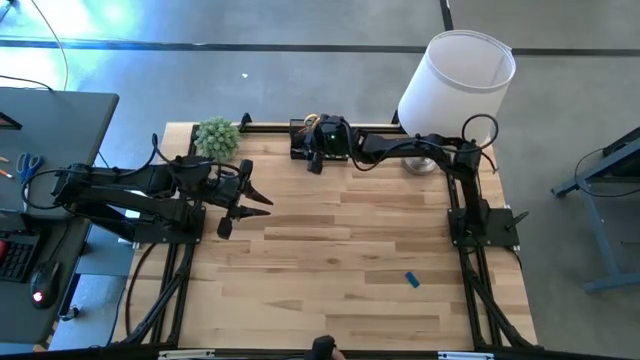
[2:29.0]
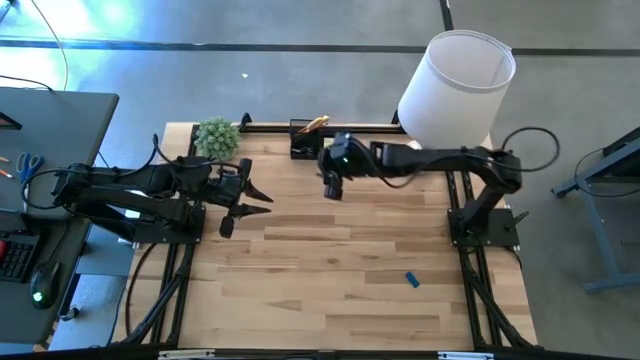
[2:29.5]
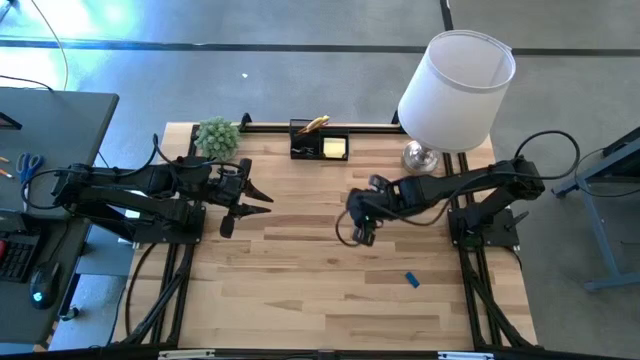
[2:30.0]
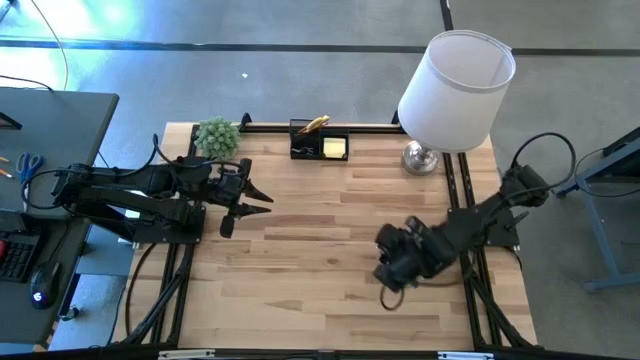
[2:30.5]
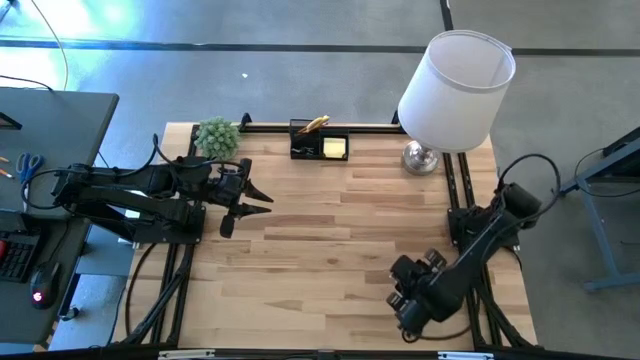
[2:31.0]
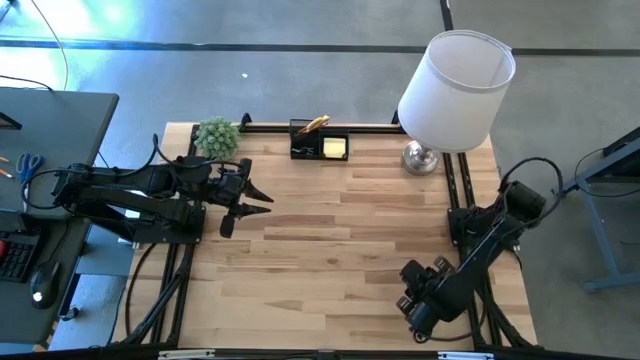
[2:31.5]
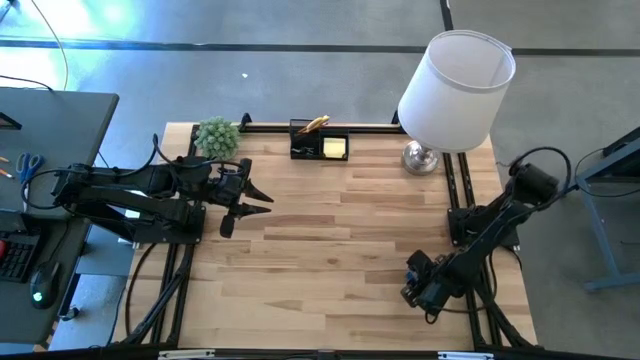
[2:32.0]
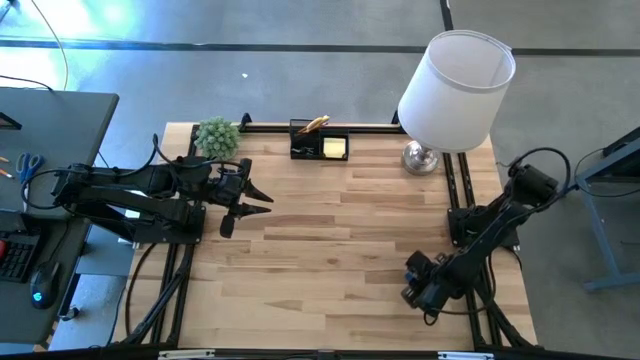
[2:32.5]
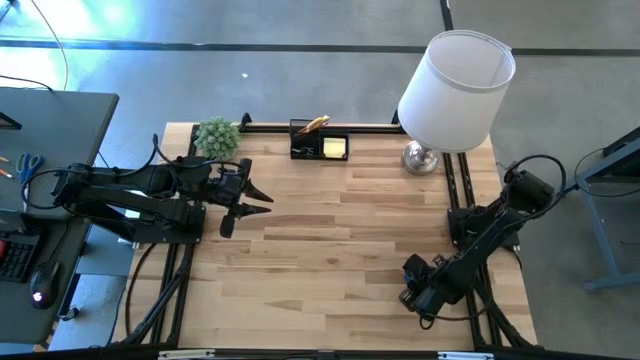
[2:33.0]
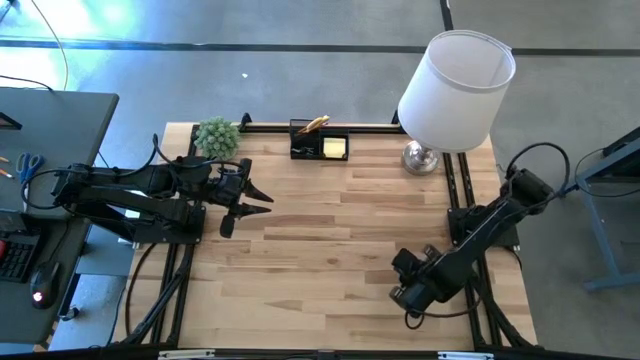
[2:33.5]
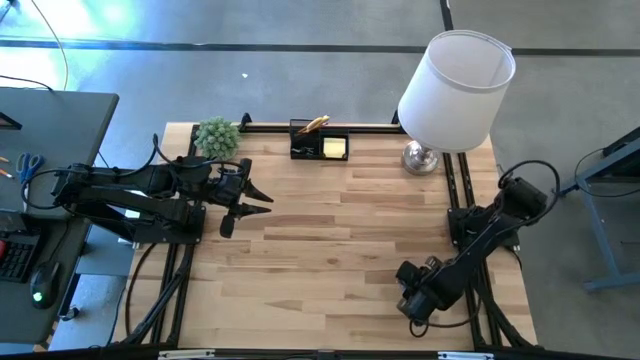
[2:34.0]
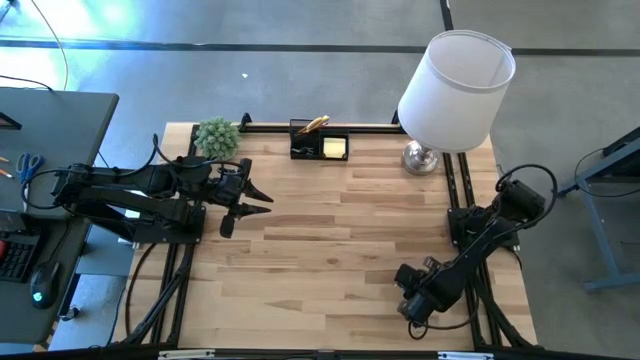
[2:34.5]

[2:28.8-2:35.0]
Task: Pick and place office supplies into organizer
Put the eraser into the bottom left slot of the desk organizer

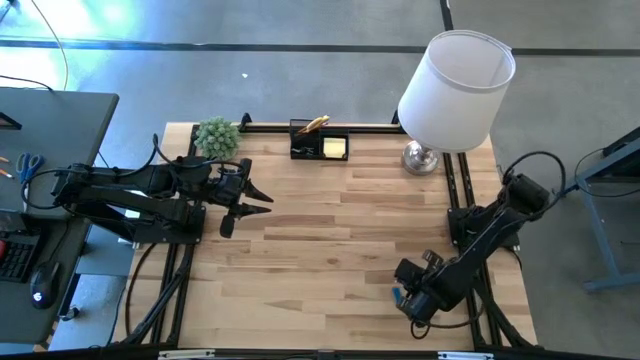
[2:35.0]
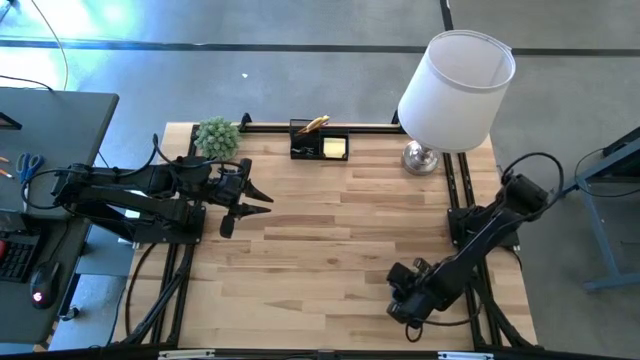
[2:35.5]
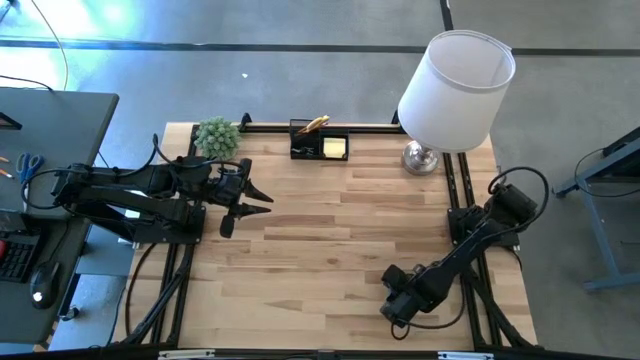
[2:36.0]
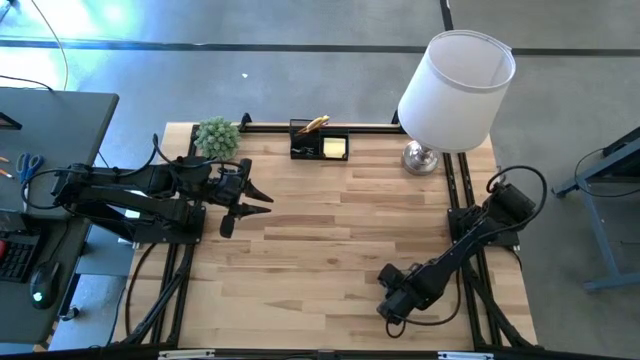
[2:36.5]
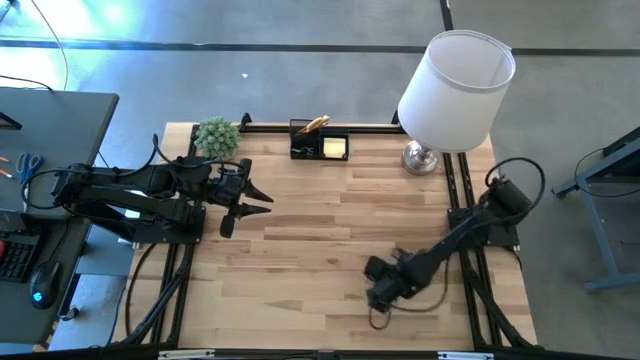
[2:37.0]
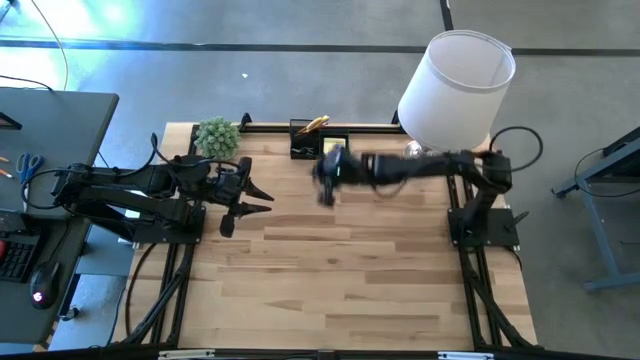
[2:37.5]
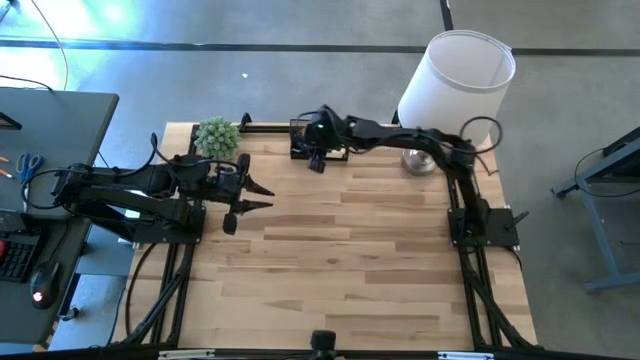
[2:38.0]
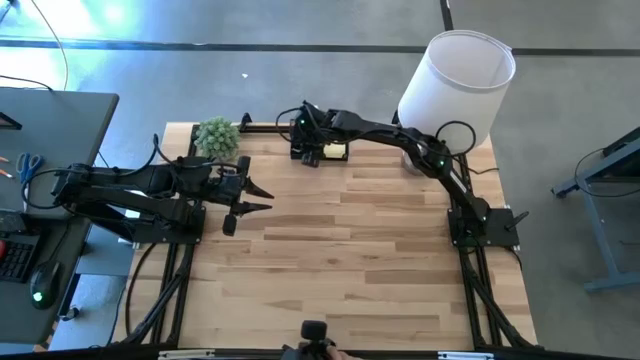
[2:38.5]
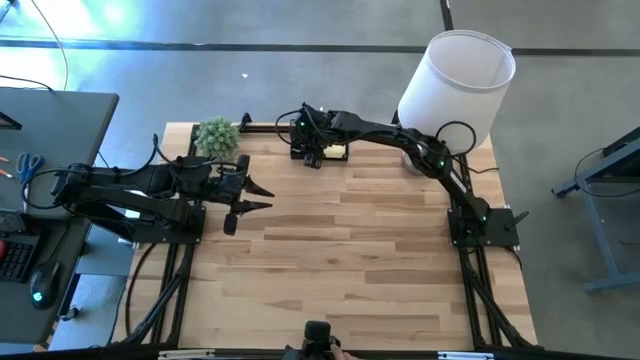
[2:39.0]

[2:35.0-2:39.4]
Put the eraser into the bottom left slot of the desk organizer

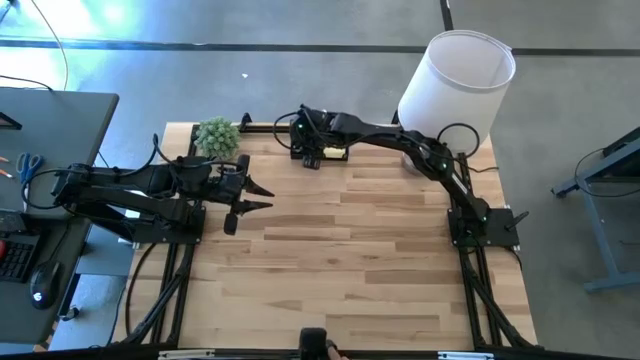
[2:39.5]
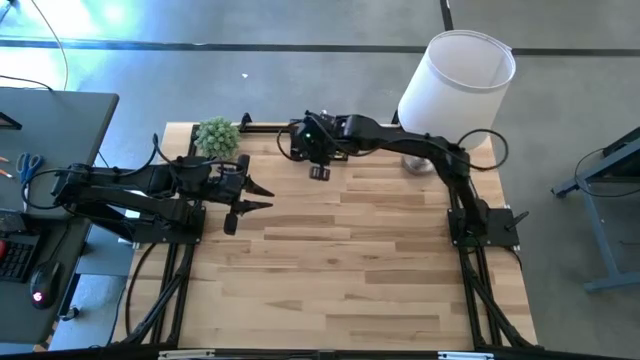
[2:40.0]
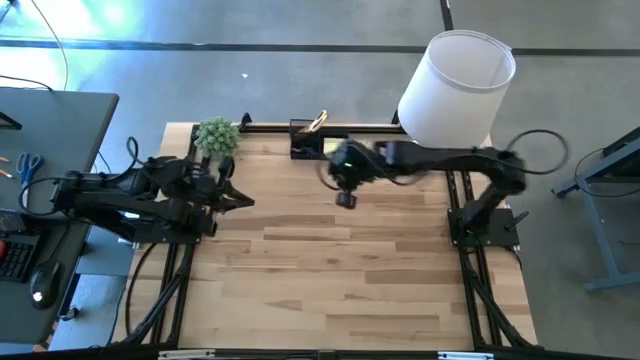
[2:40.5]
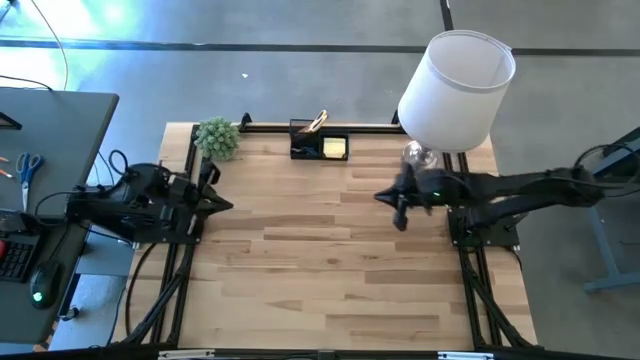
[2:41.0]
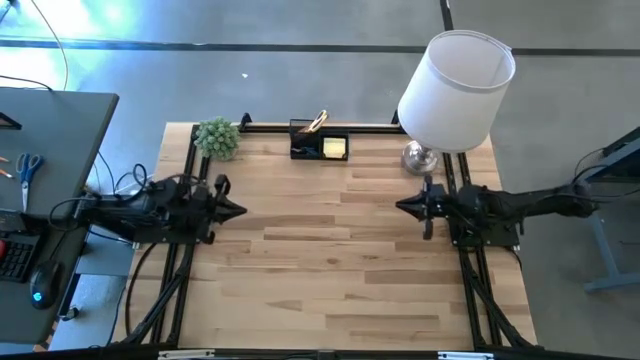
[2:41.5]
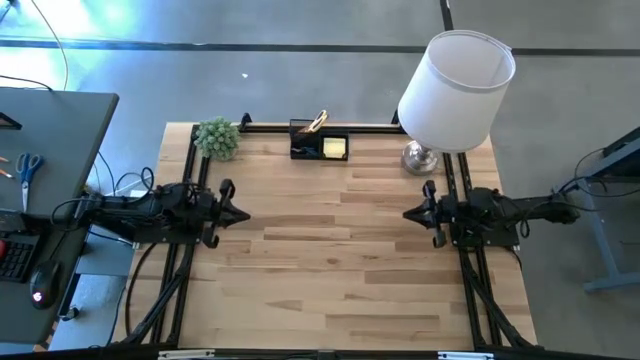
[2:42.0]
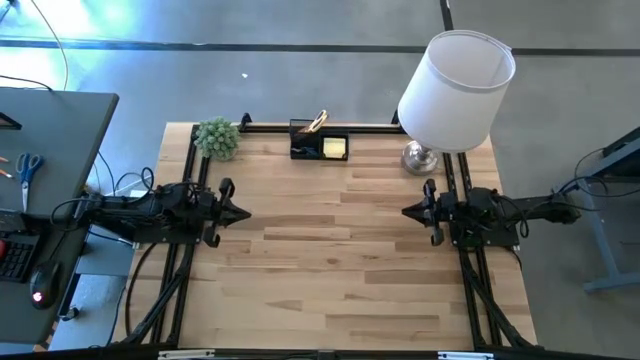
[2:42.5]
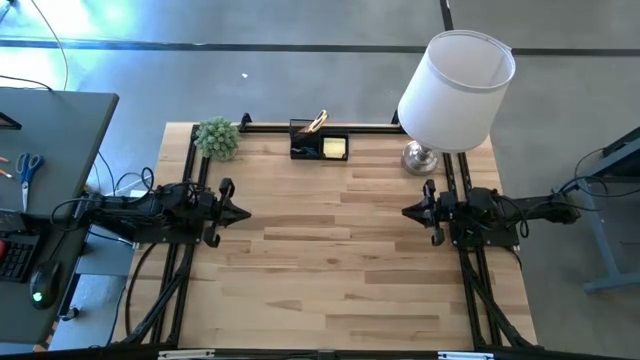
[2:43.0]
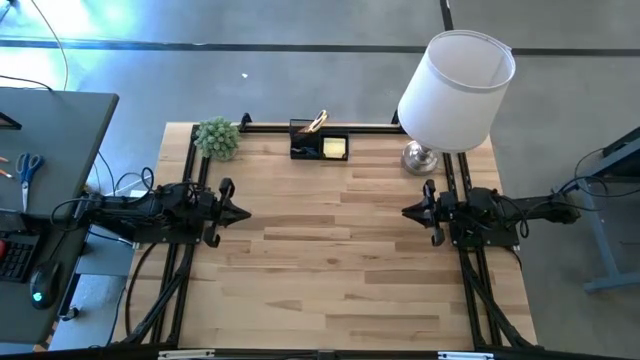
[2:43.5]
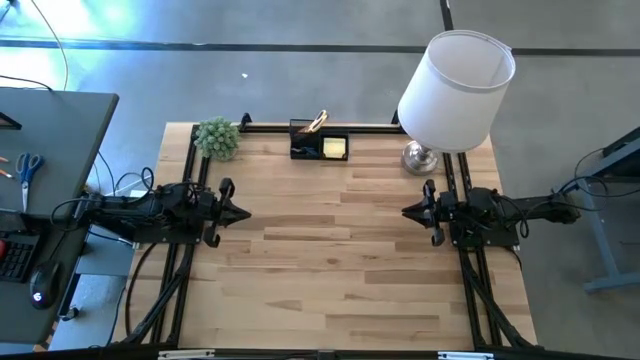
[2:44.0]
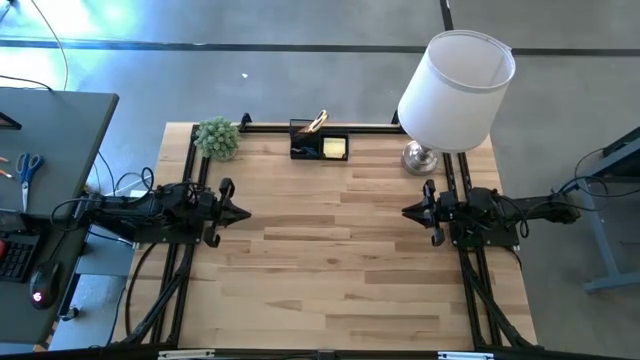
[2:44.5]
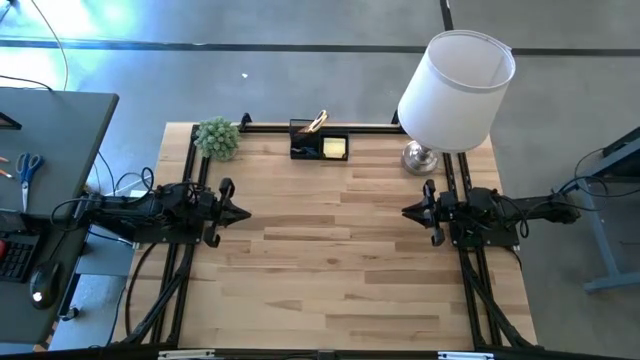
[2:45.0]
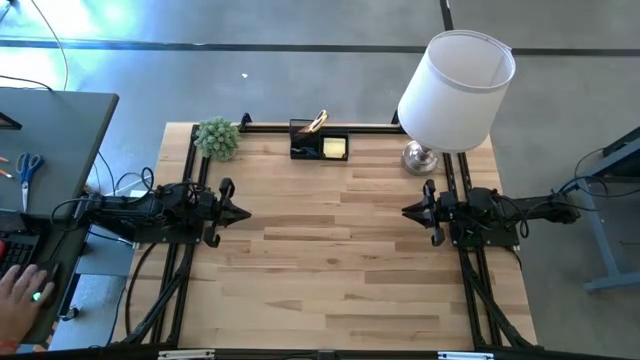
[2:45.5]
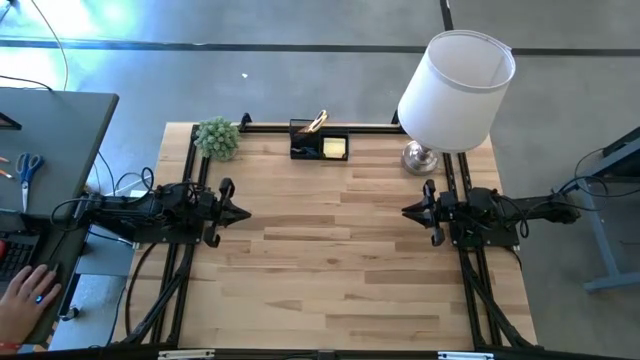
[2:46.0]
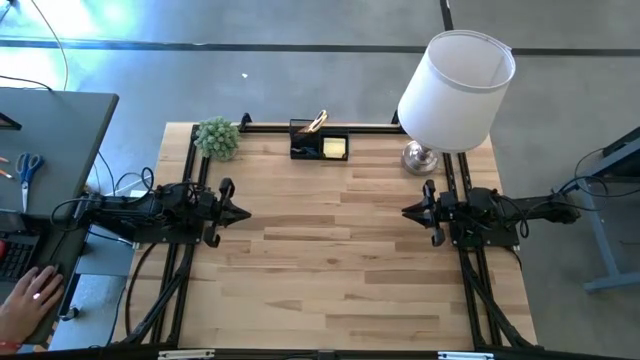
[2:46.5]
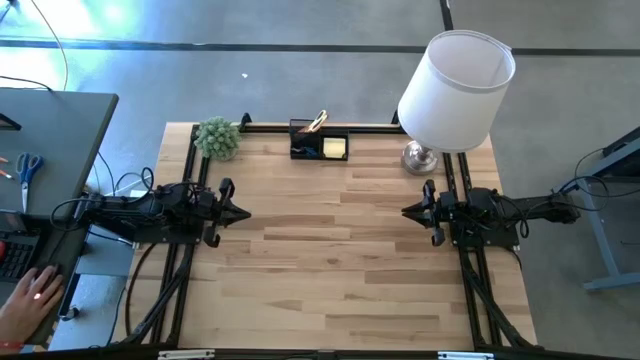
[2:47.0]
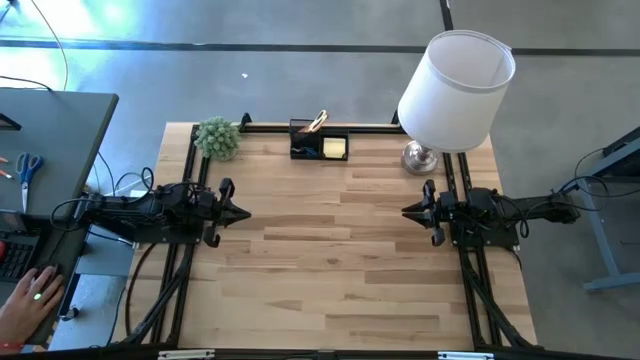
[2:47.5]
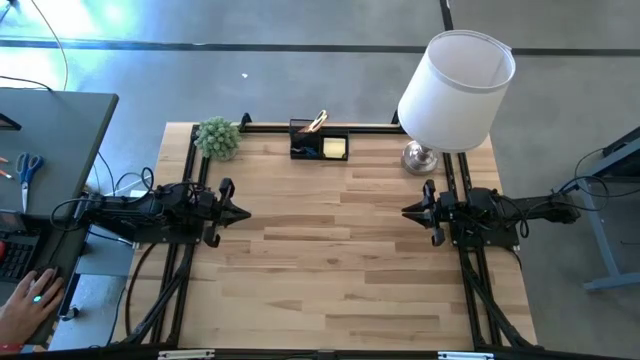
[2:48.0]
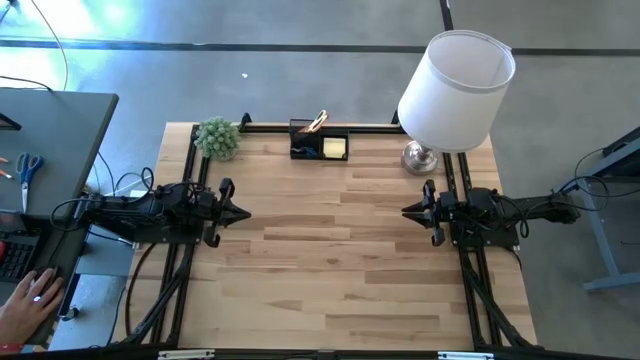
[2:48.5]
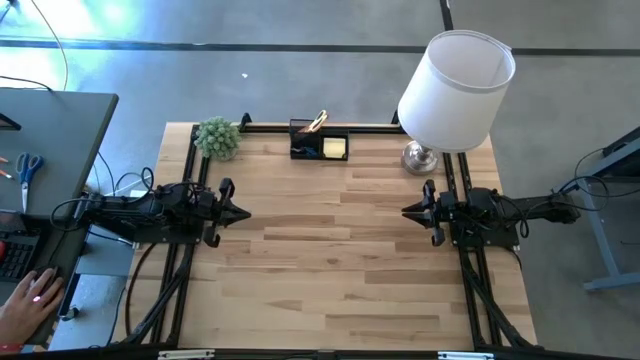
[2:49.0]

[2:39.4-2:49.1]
Return to Home Position

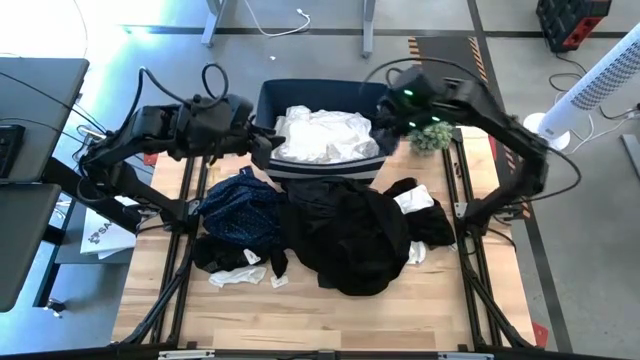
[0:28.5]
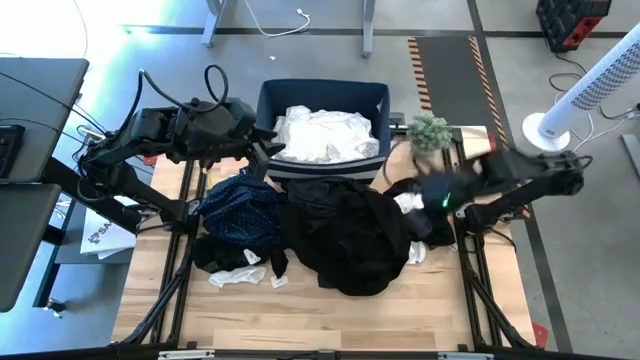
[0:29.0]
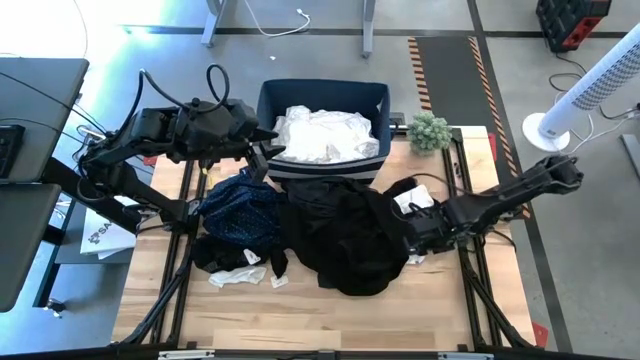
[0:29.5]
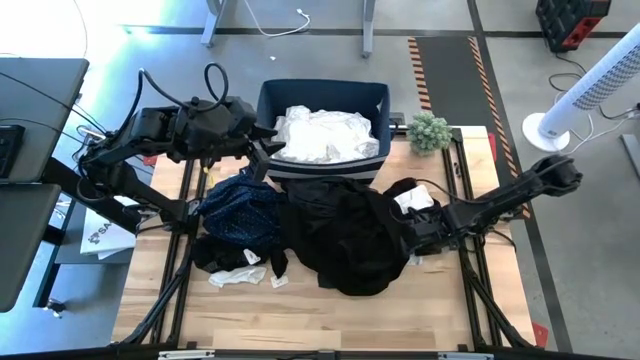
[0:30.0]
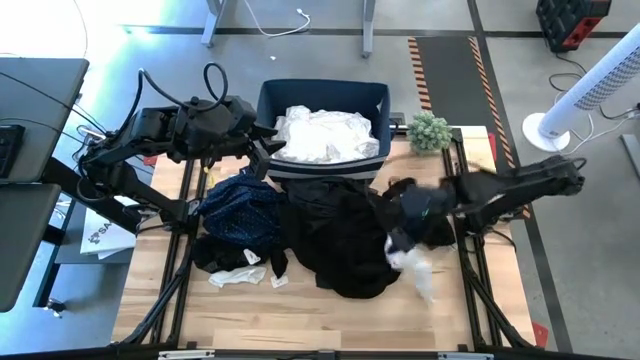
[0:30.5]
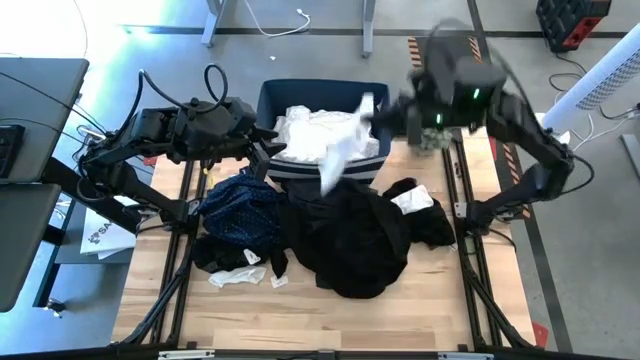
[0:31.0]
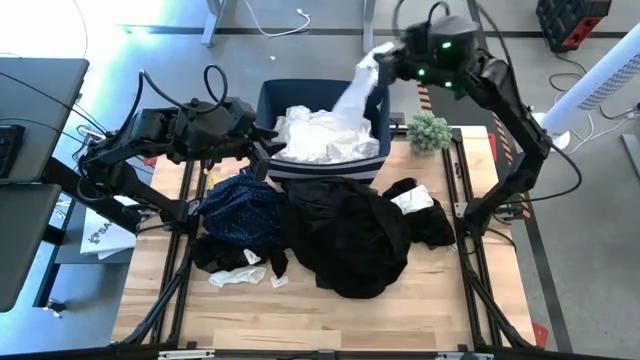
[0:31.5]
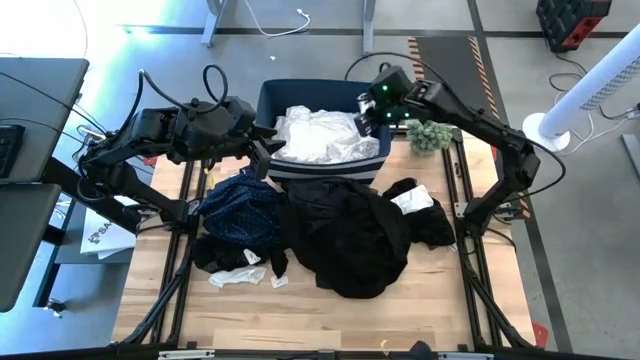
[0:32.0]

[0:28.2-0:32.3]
Task: Sort clothes
Put the center white sock into the blue bin
